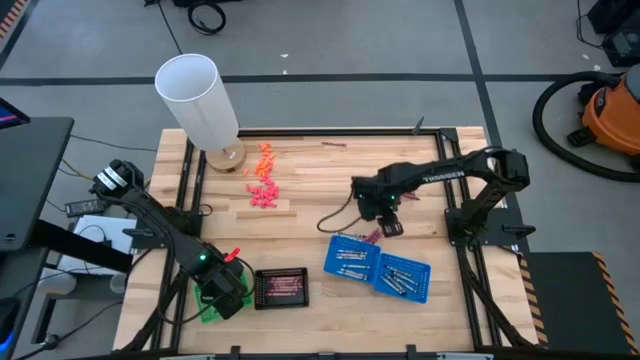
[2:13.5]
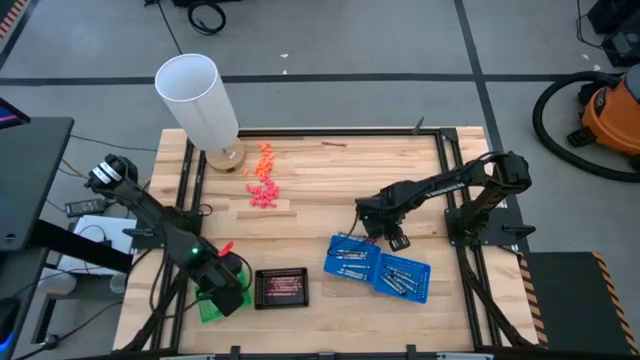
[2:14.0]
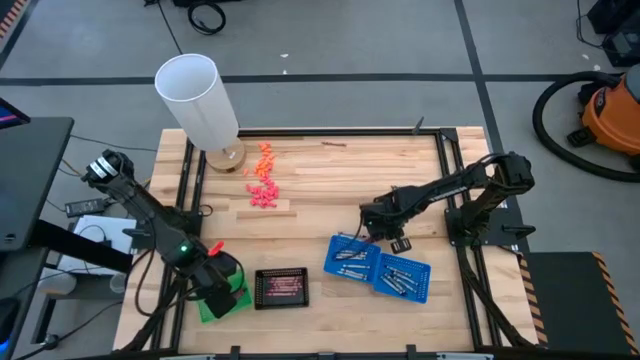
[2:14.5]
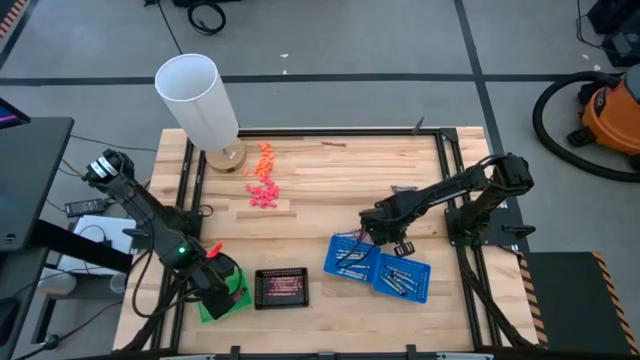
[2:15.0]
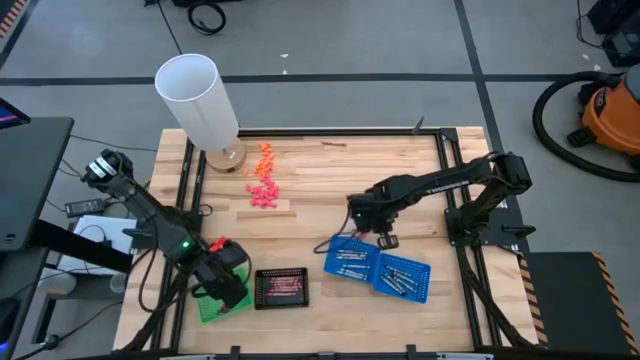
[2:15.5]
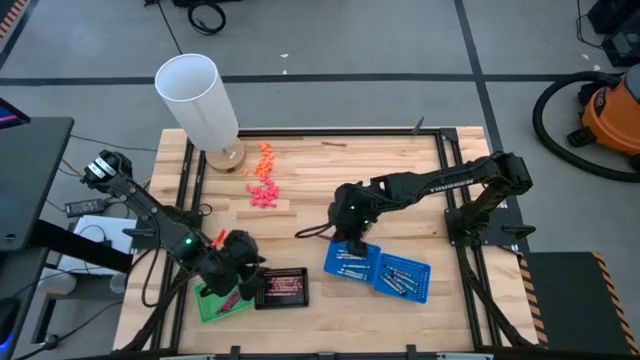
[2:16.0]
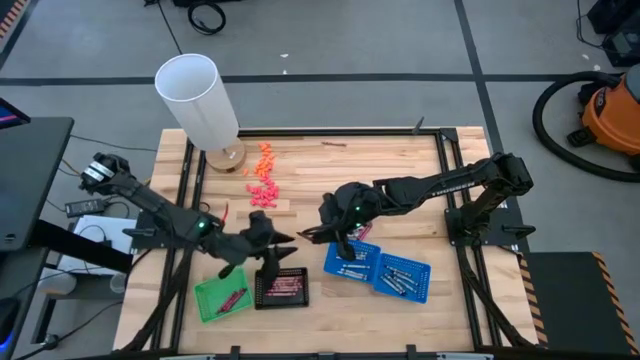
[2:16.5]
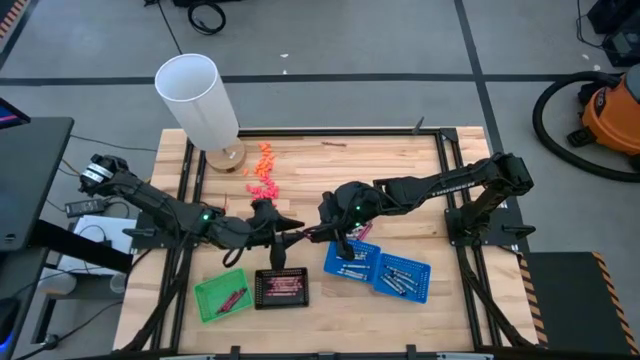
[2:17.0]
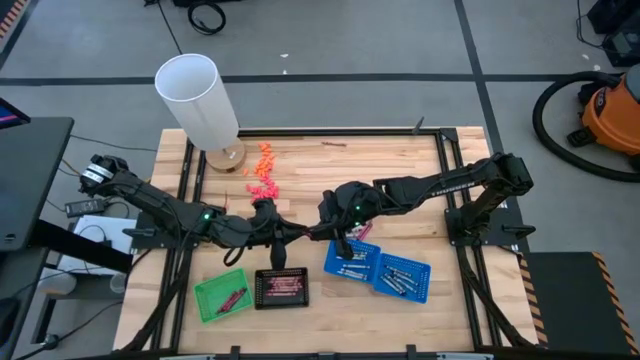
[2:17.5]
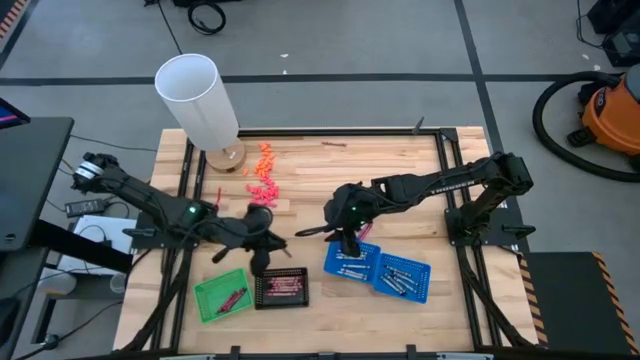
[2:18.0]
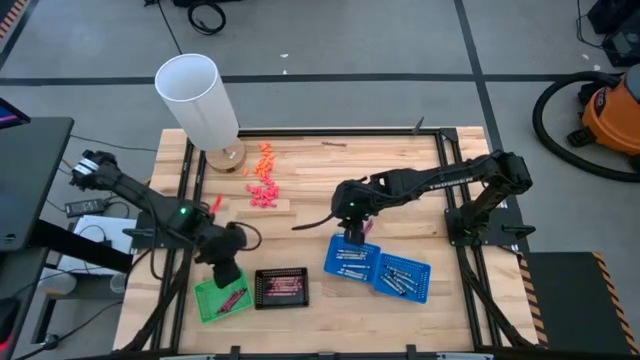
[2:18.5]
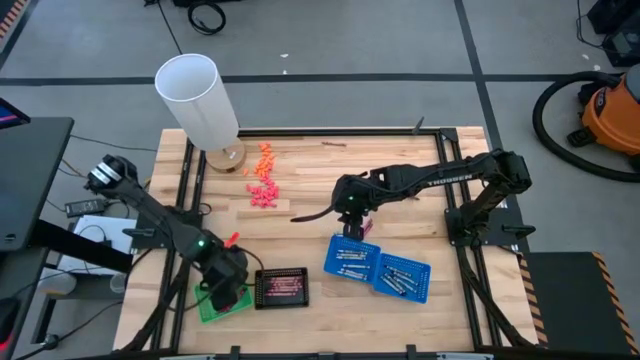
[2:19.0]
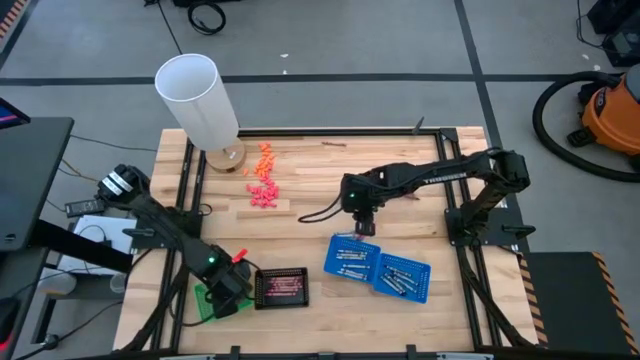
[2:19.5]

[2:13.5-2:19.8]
Task: Sort crayons
Put the red crayon into the green bin

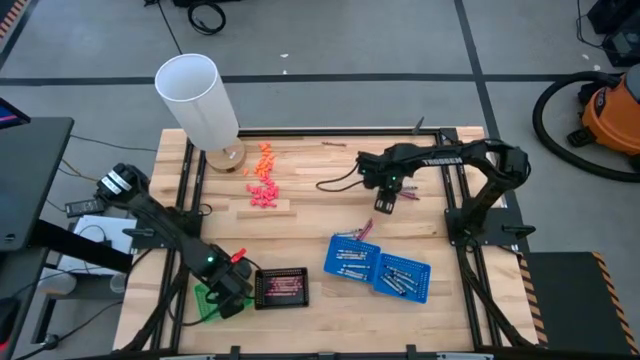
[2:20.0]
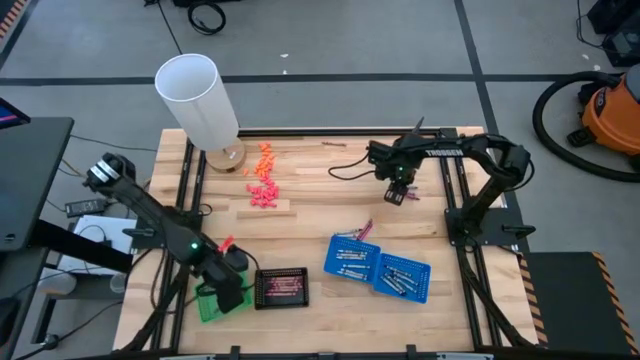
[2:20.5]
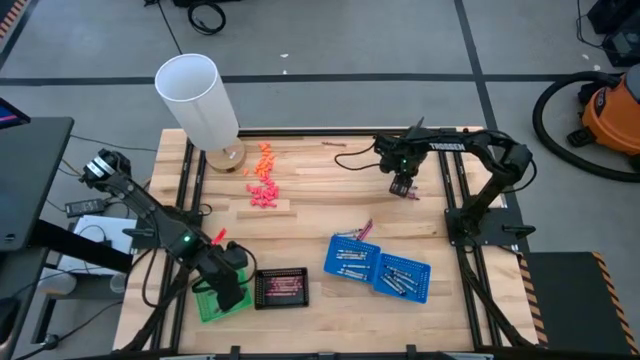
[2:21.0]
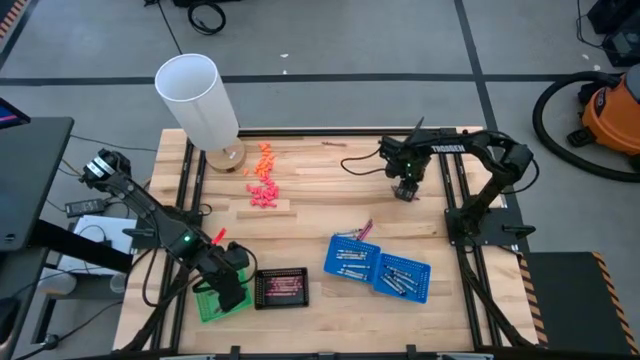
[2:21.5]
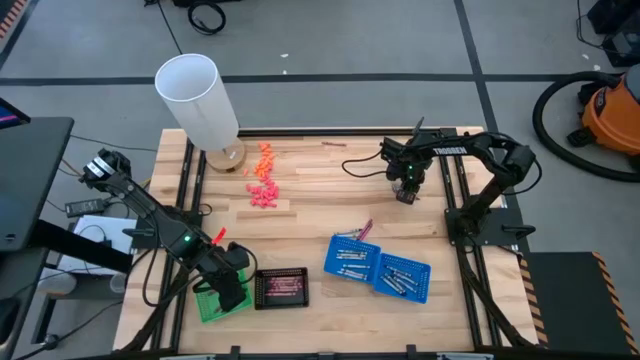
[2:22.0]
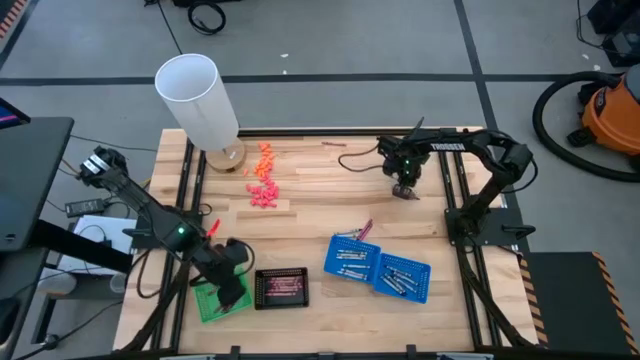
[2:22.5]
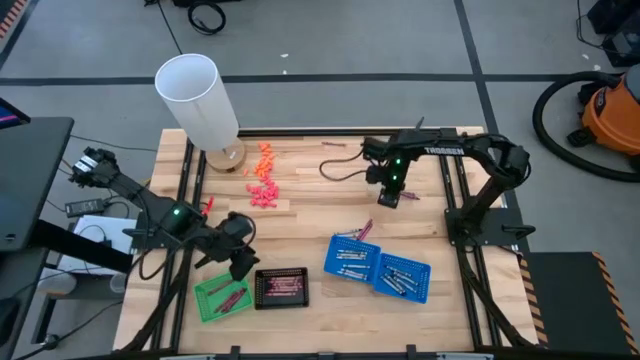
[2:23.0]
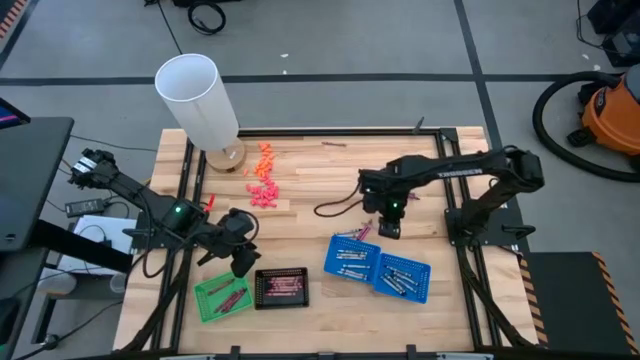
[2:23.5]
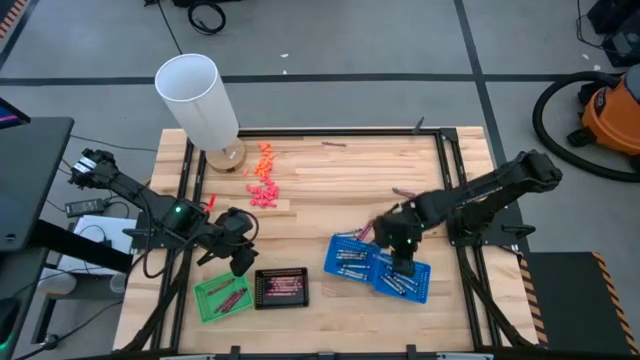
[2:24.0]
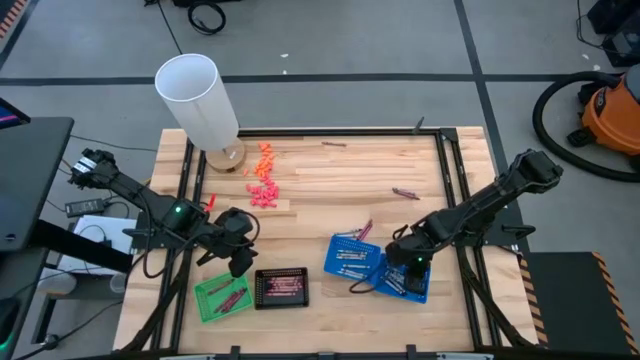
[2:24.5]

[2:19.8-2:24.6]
Put the black crayon into the right blue bin

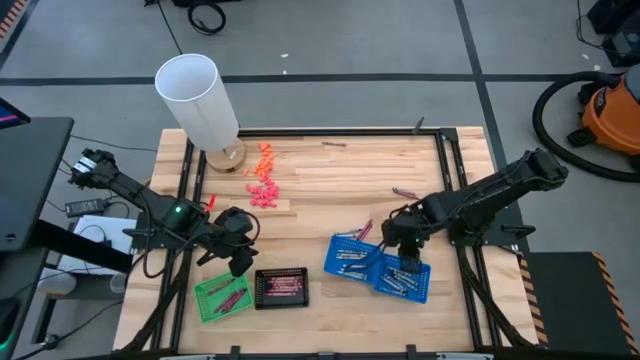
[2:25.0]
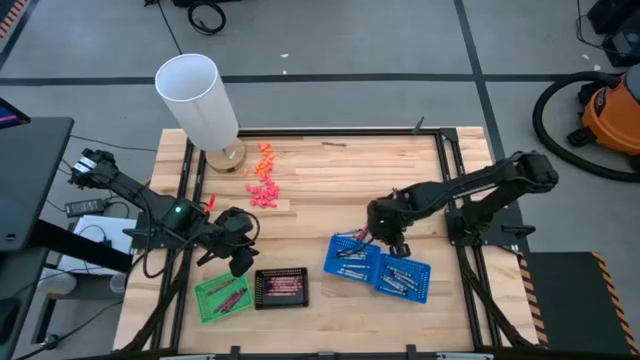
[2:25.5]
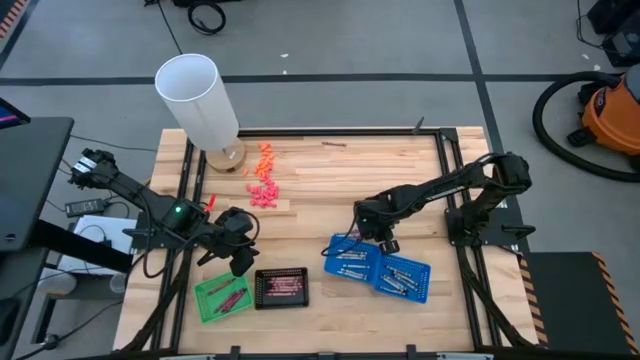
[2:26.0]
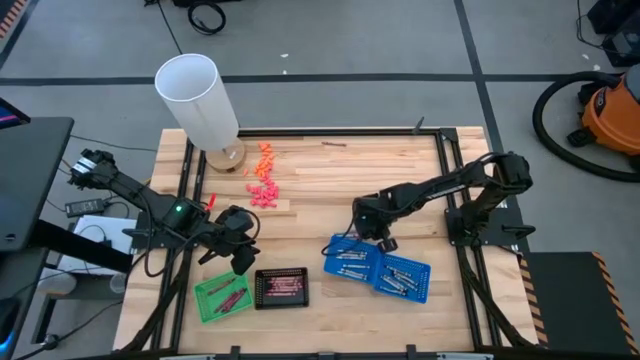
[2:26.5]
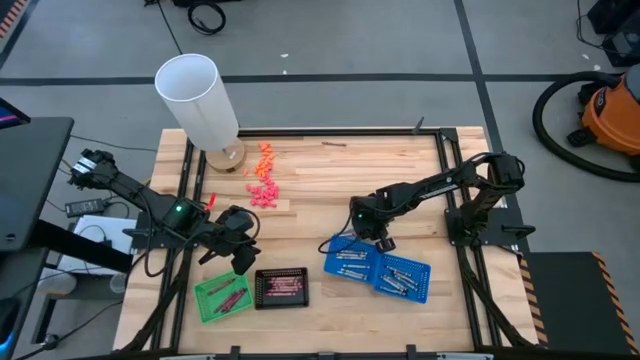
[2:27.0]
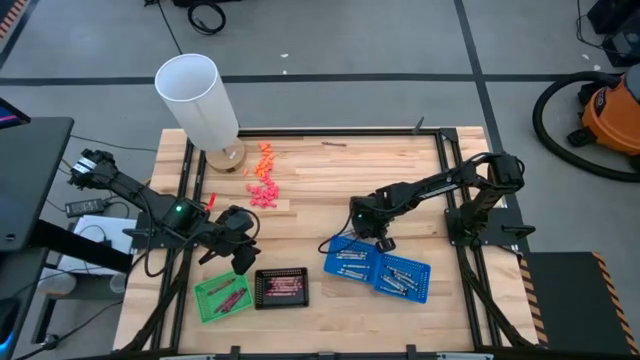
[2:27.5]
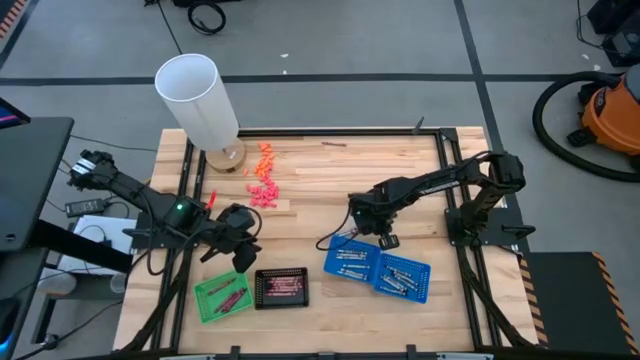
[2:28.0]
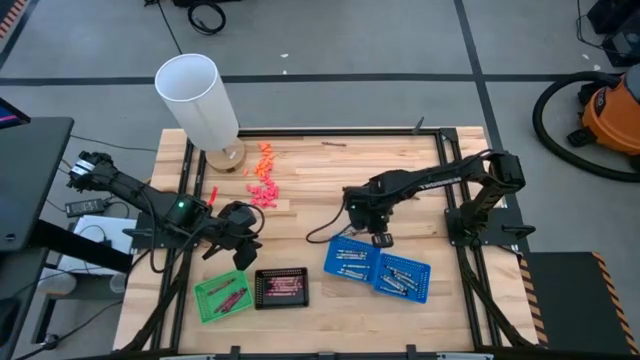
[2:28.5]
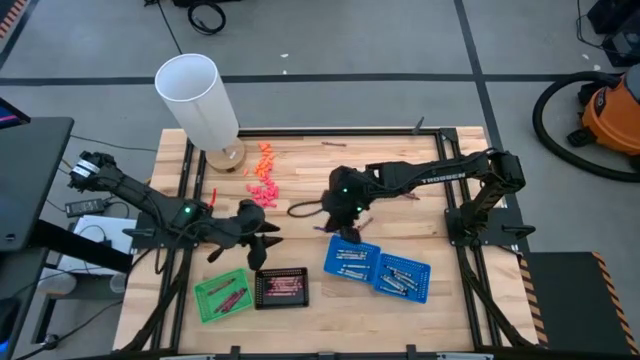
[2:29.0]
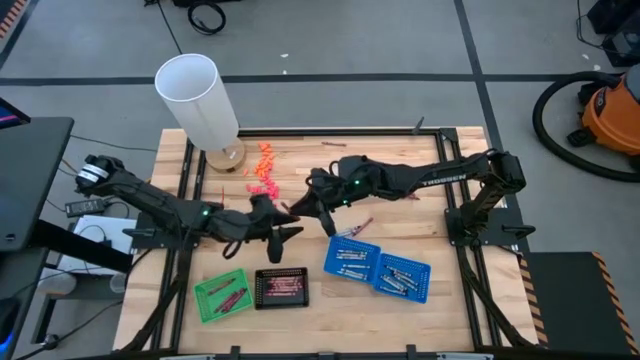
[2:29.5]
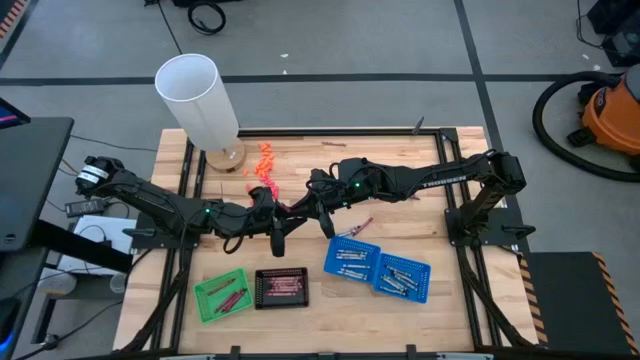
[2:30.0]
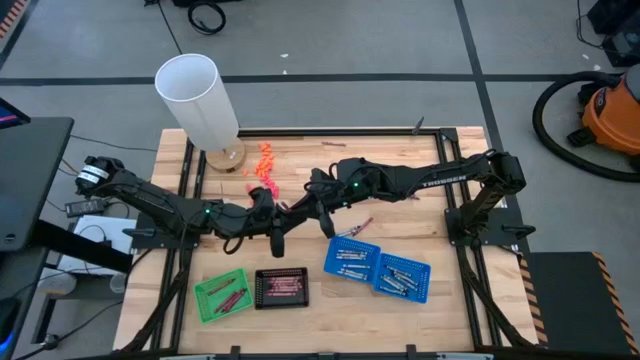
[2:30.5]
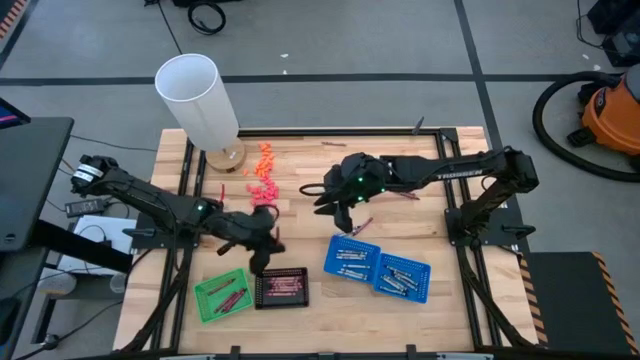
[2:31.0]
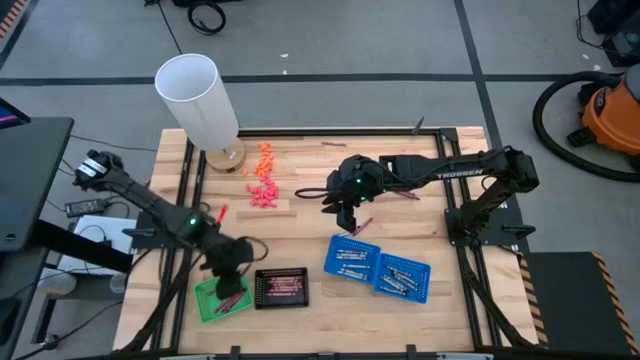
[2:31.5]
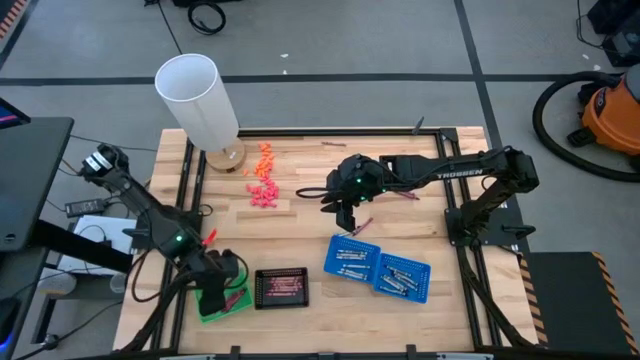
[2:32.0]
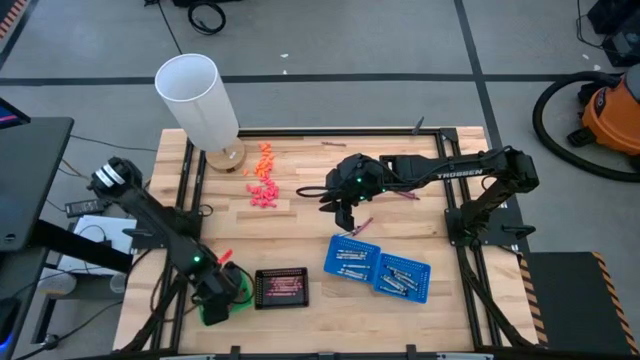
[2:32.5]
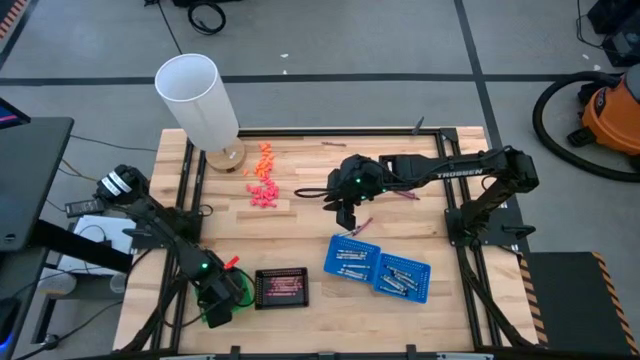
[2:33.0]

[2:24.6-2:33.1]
Put the red crayon into the green bin
